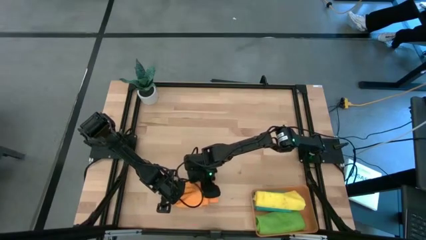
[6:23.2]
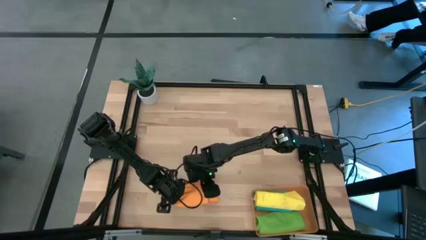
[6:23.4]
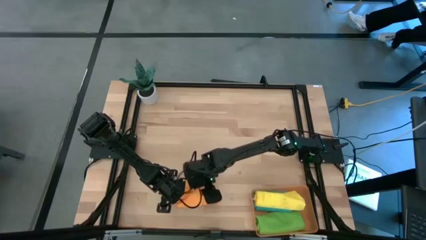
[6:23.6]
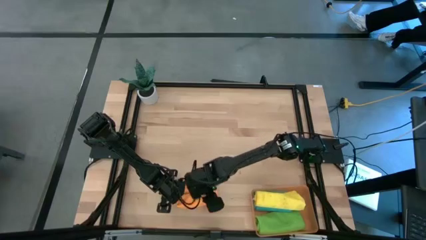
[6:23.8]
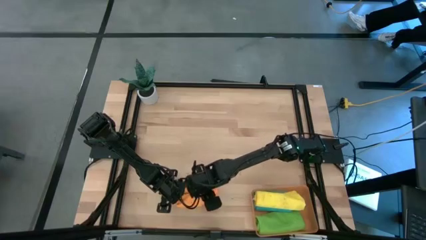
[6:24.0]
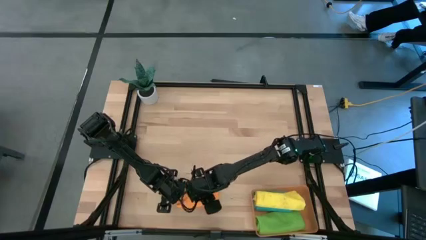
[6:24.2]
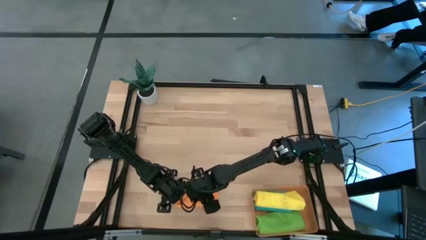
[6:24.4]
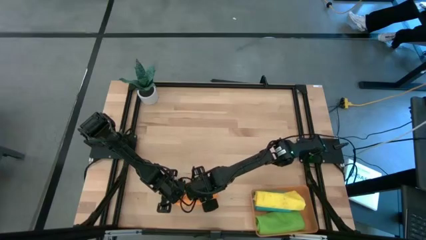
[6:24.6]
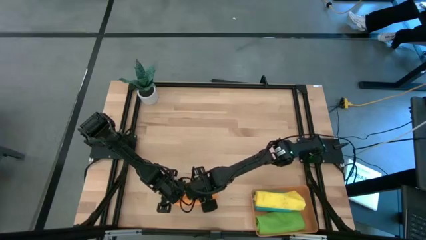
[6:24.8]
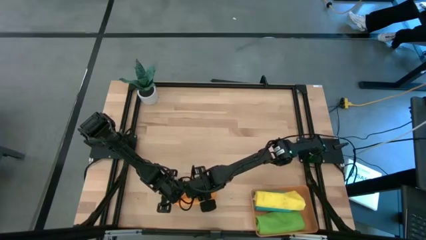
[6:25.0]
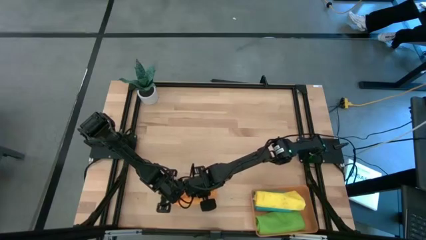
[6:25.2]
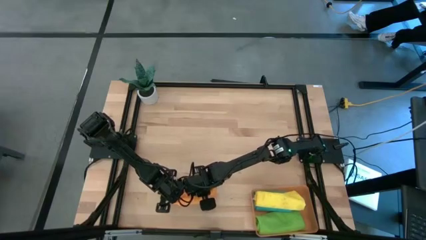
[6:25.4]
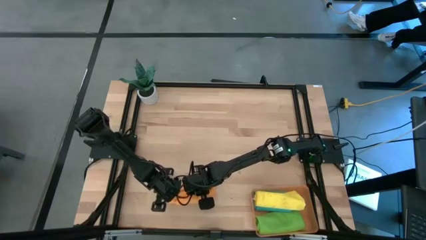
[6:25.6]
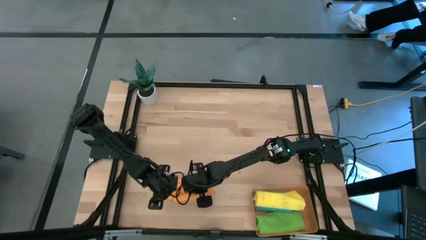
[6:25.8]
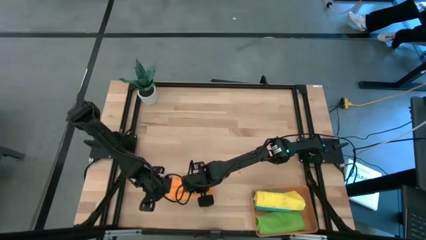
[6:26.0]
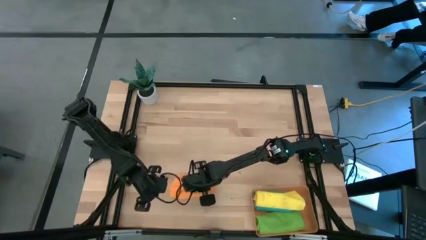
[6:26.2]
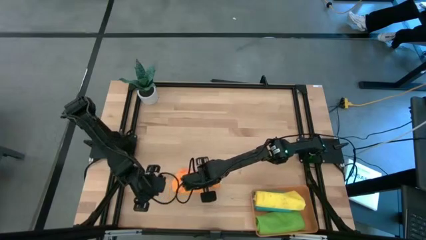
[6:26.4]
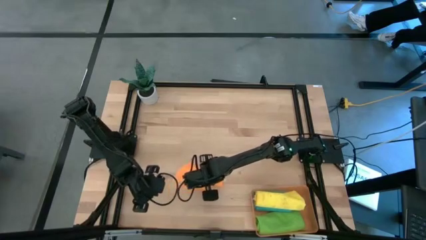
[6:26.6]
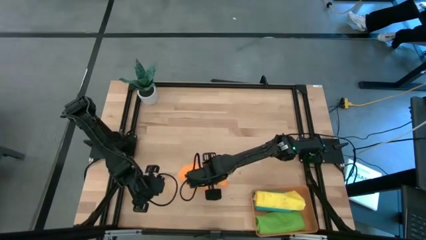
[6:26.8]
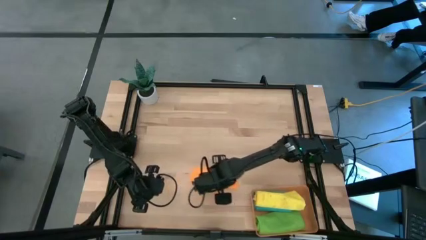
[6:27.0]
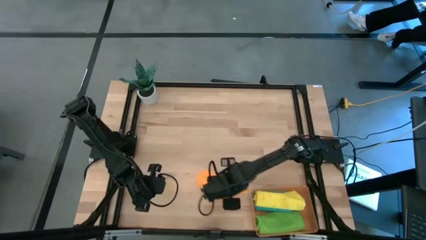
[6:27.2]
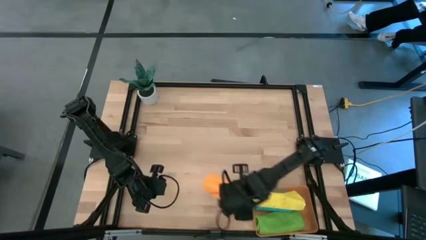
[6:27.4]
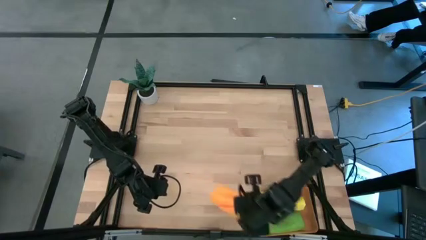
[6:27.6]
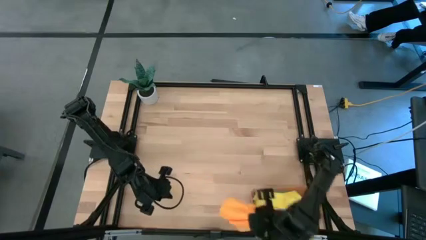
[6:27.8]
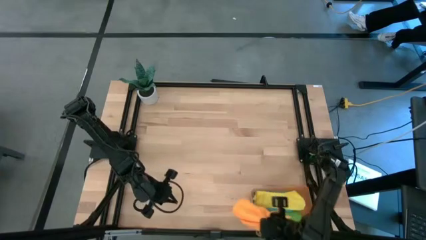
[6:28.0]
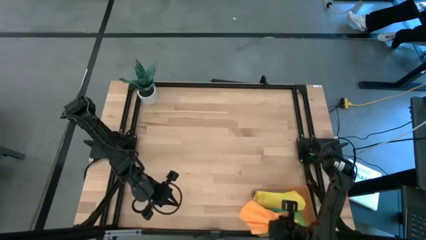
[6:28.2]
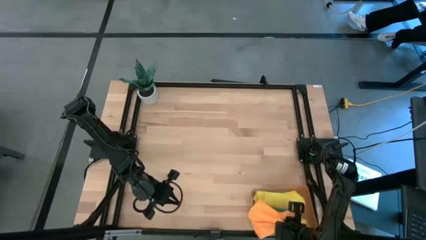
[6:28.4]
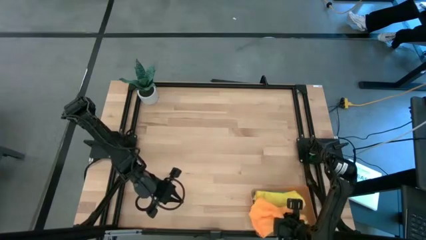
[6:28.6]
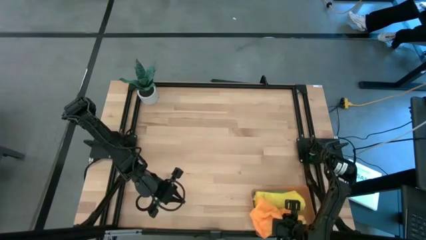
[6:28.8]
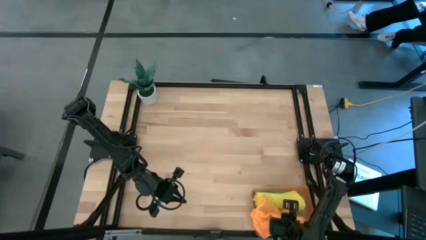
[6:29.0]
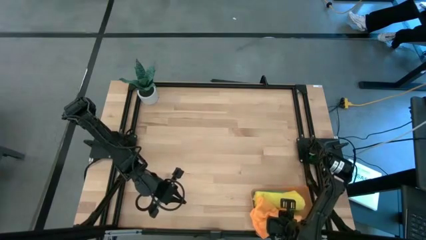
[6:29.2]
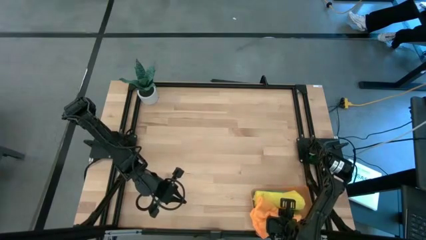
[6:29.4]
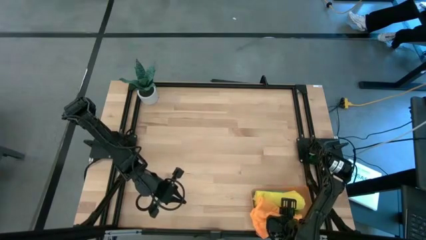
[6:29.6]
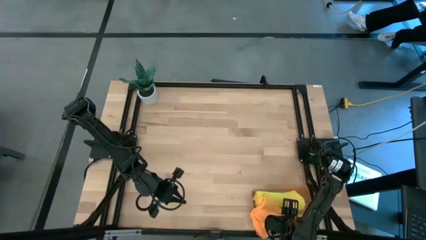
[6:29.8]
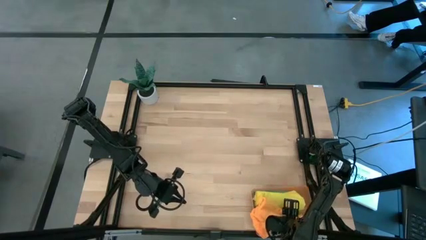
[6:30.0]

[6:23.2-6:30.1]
Task: Roll microfiber towels into tight, uniform cylinder then place into a basket
Stack the orange microfiber towel on top of the green microfiber towel in the orange bin

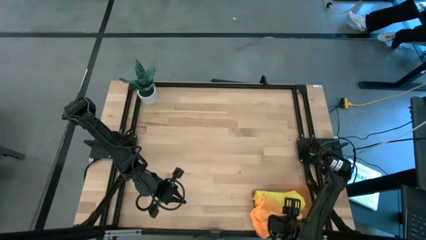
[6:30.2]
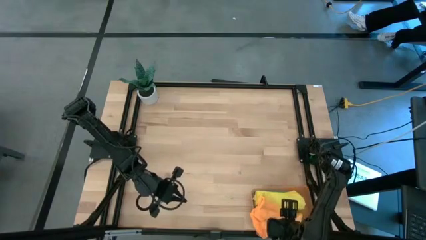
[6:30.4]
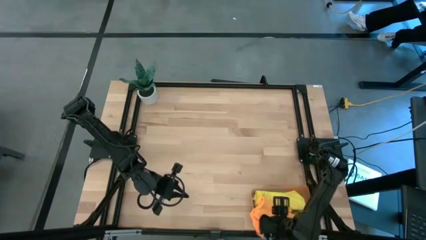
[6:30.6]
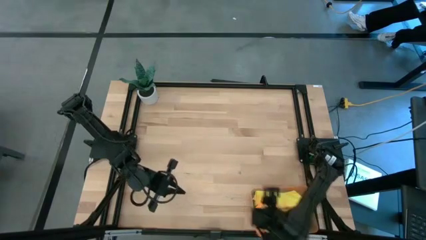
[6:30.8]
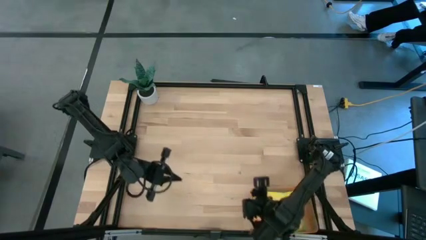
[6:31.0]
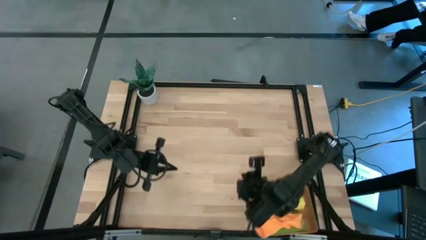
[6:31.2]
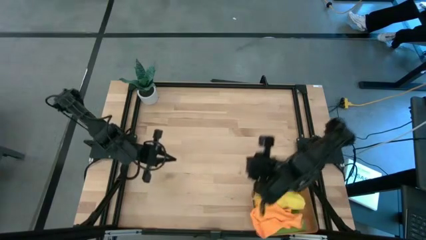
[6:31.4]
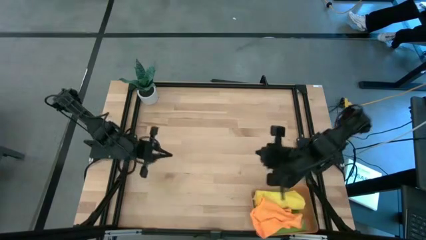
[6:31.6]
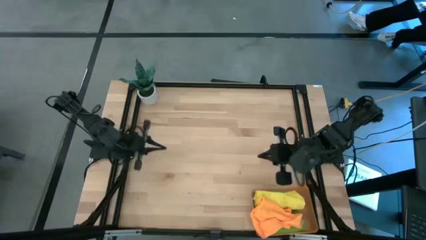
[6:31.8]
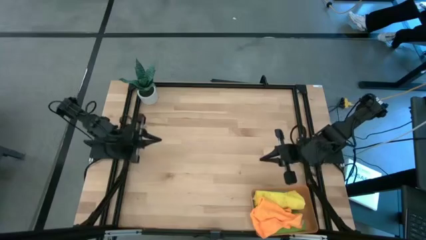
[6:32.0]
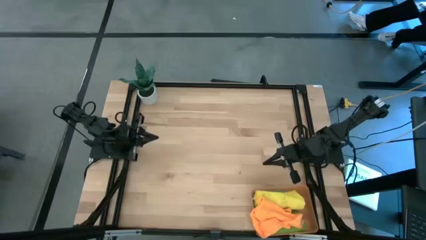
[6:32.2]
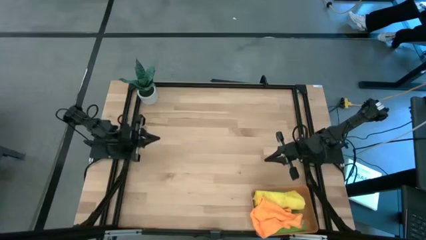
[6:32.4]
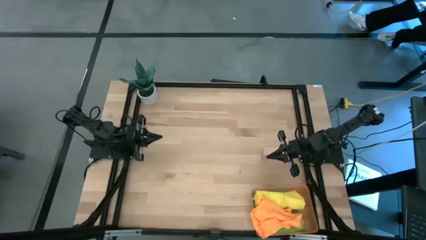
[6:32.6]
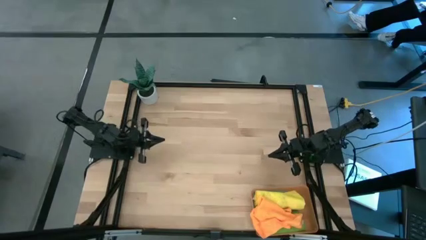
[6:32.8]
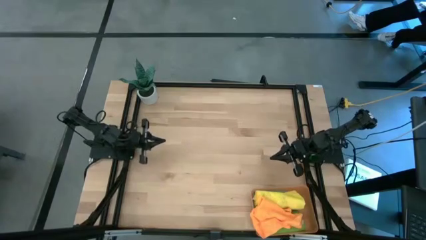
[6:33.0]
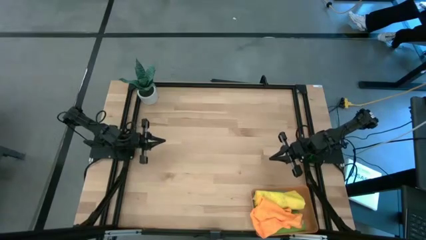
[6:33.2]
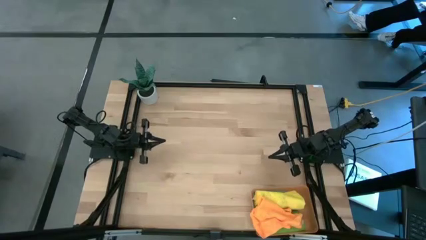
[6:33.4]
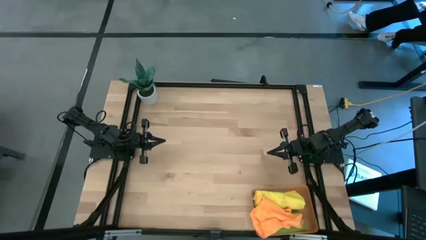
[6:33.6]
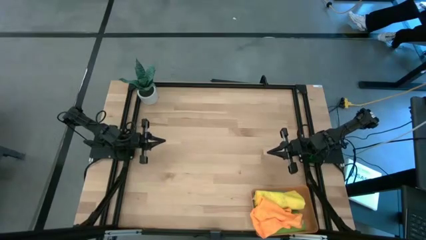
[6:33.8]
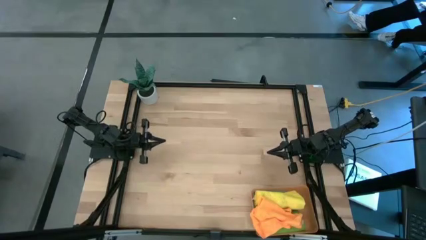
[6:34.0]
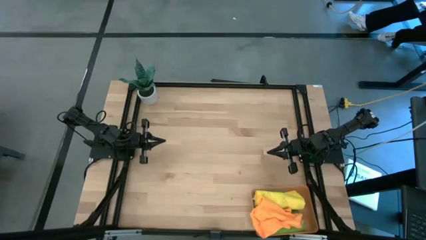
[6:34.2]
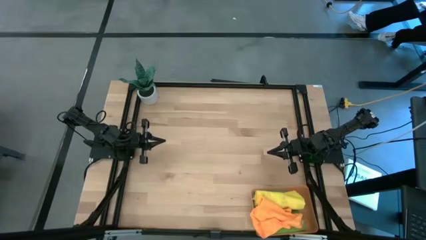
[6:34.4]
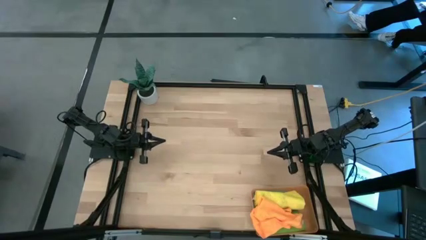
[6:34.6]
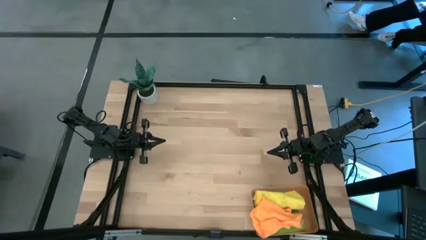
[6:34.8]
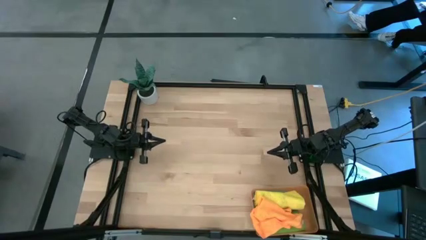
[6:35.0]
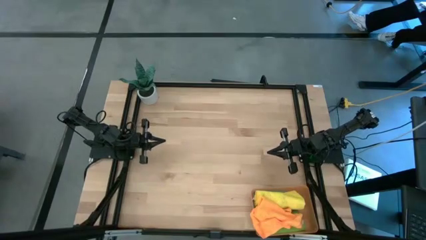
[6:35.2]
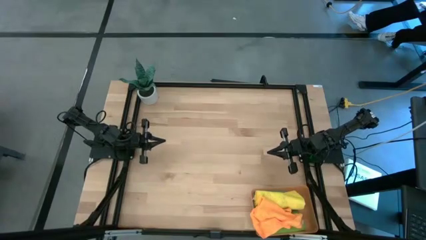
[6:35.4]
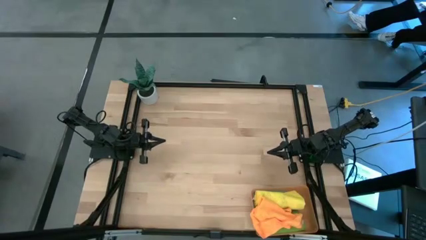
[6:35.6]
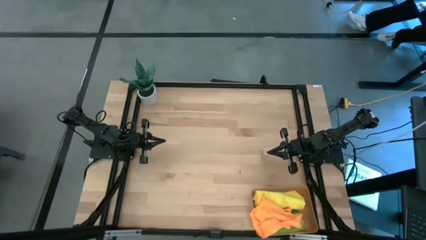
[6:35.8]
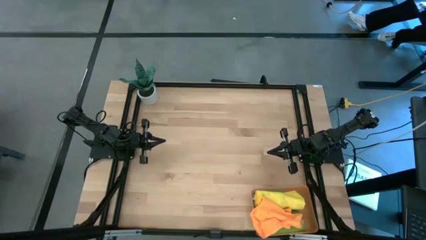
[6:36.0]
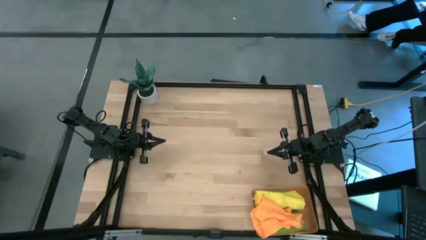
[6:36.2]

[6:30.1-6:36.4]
Return to Home Position

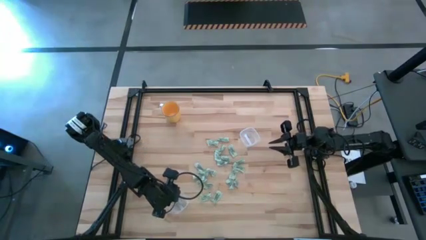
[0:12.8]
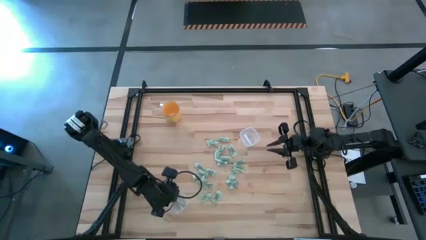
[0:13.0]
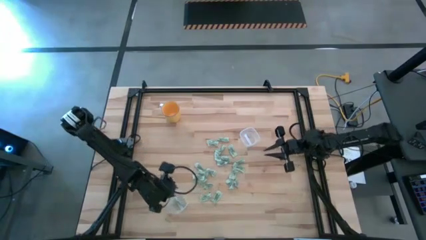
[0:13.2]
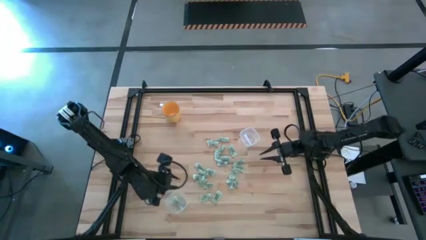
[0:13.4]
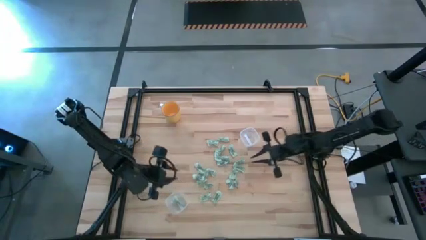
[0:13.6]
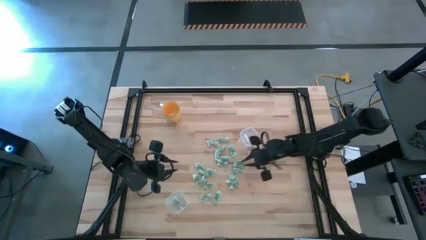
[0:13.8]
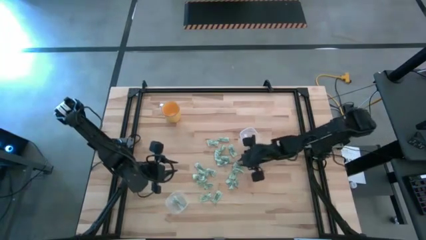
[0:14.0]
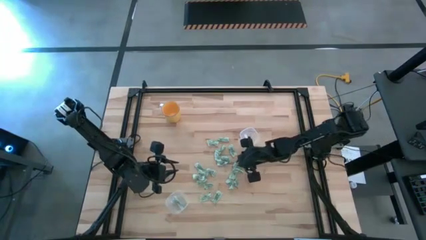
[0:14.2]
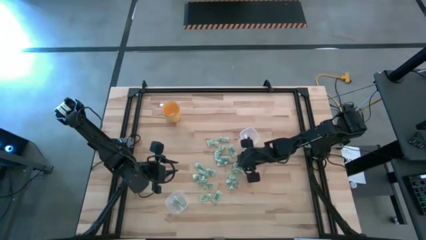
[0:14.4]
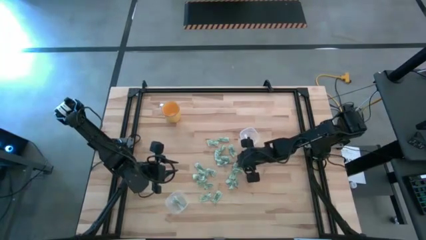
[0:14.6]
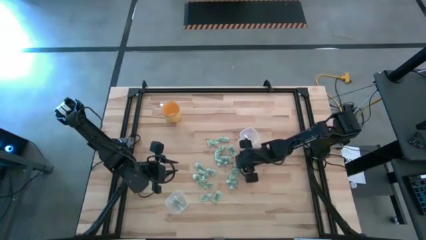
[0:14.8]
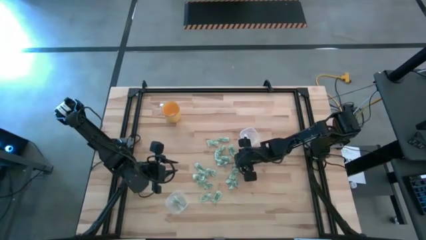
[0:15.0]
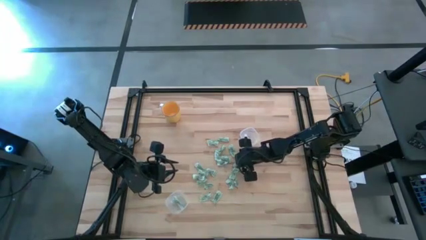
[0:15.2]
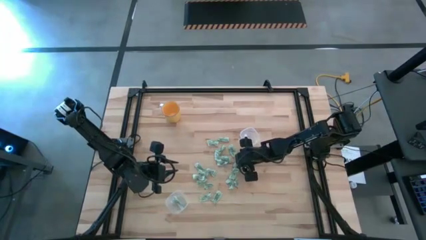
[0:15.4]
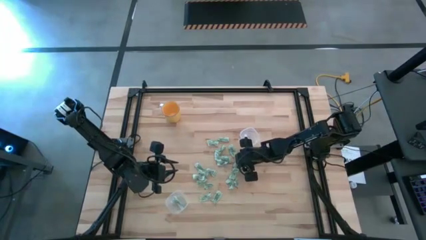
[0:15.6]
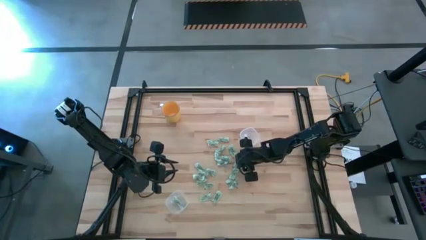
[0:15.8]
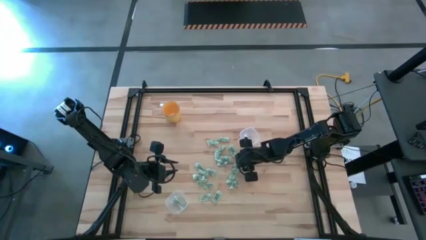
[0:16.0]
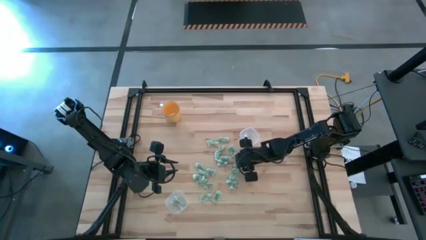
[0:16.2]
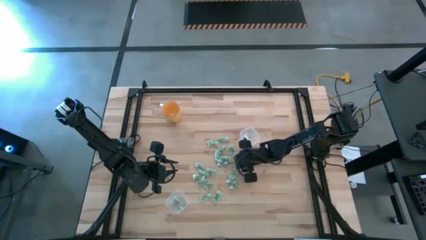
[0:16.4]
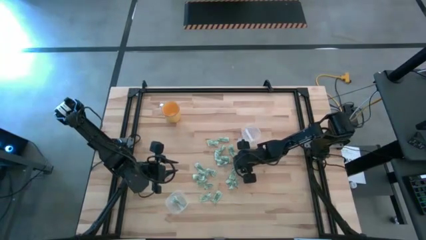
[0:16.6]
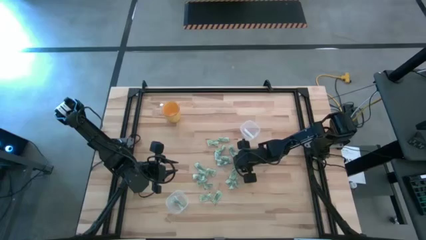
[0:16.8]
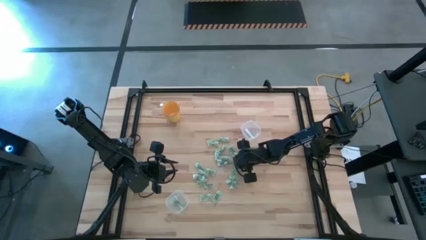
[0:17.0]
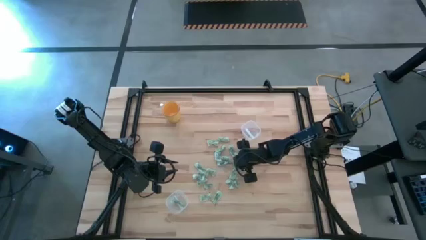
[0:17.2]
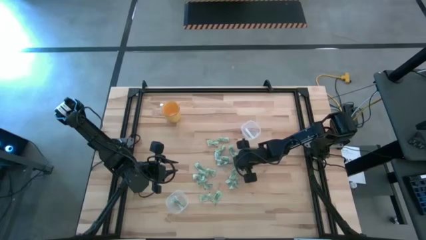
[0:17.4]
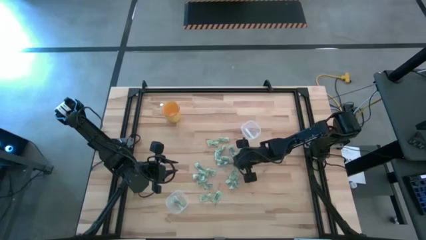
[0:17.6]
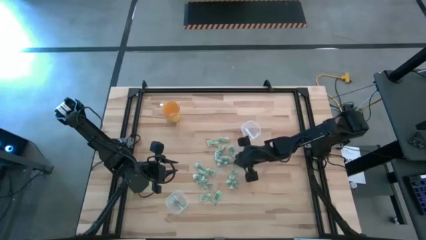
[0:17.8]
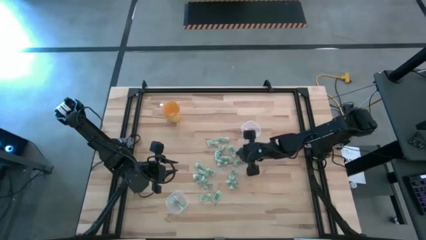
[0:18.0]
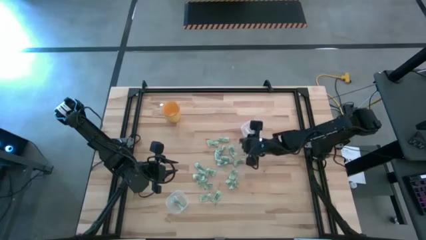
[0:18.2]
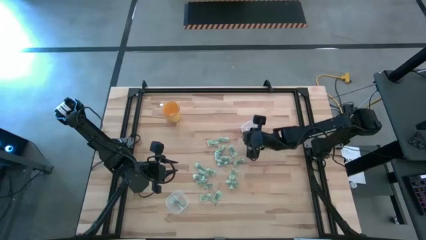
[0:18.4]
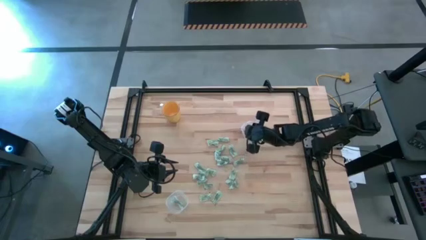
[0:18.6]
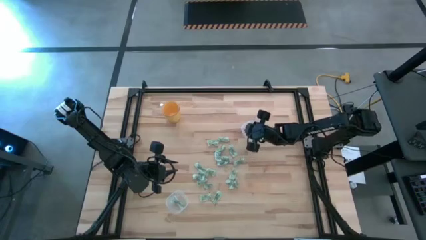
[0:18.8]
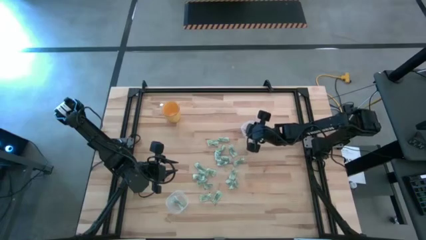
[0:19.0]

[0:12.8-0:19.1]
Task: Pick and place Stevia / Truvia into bins
Put the green stevia packet into the top transparent container
